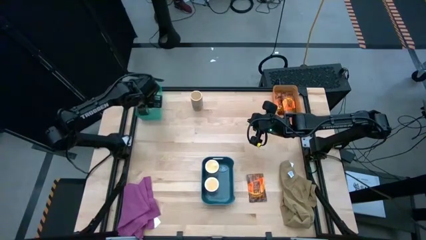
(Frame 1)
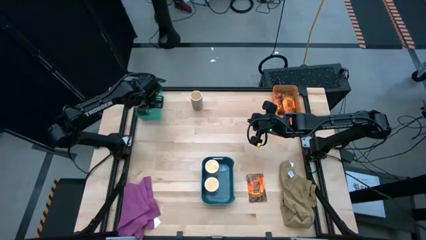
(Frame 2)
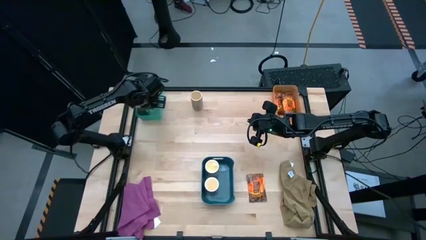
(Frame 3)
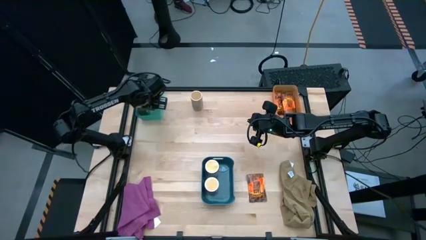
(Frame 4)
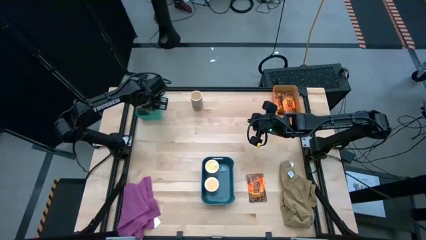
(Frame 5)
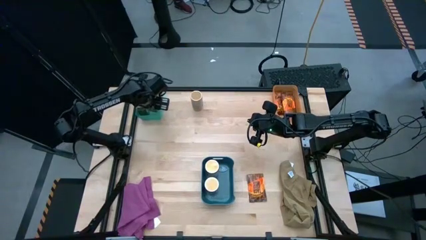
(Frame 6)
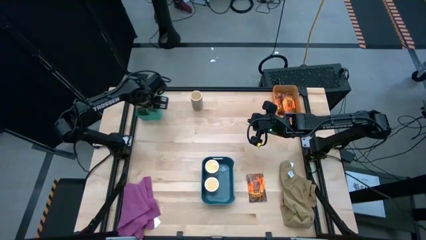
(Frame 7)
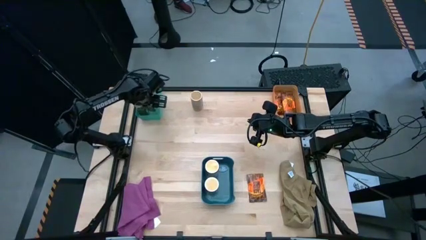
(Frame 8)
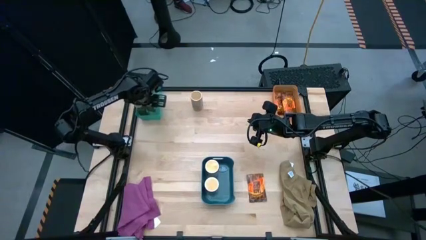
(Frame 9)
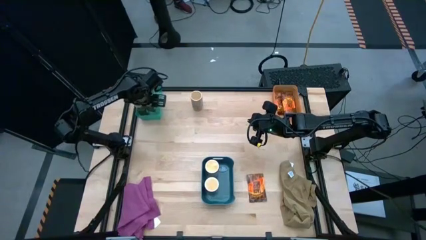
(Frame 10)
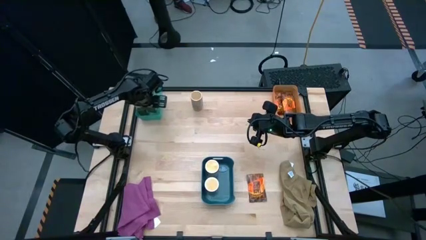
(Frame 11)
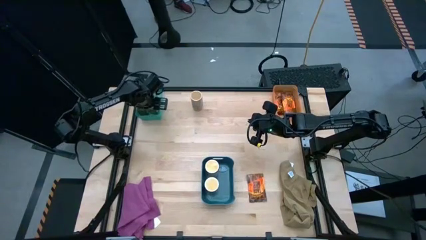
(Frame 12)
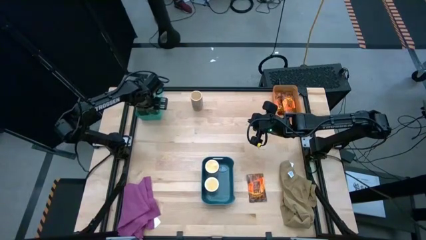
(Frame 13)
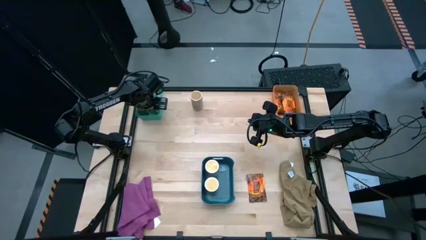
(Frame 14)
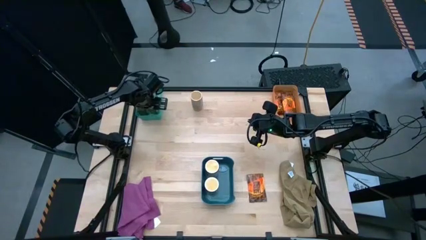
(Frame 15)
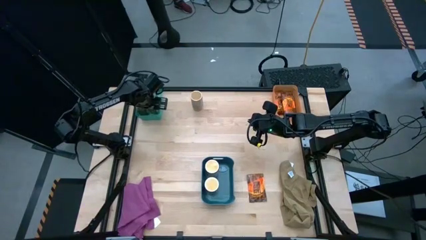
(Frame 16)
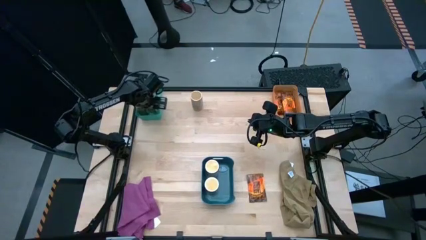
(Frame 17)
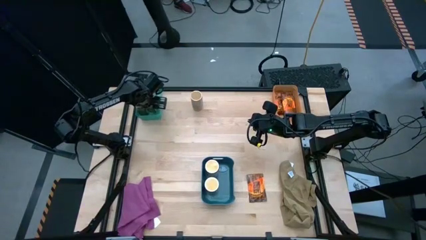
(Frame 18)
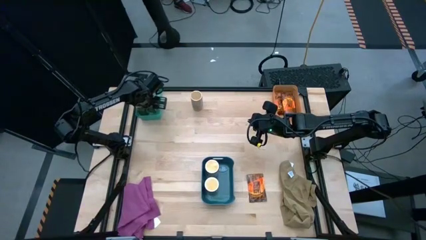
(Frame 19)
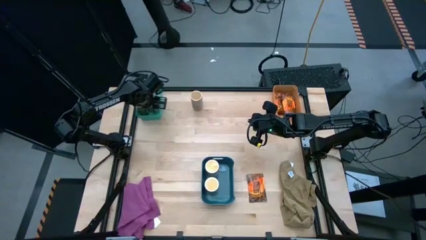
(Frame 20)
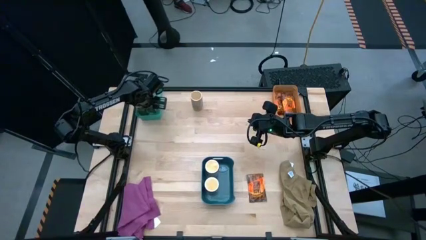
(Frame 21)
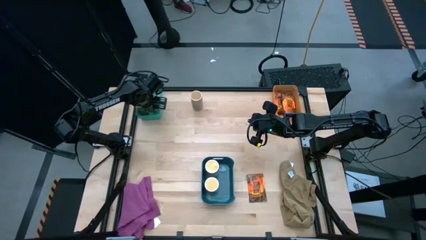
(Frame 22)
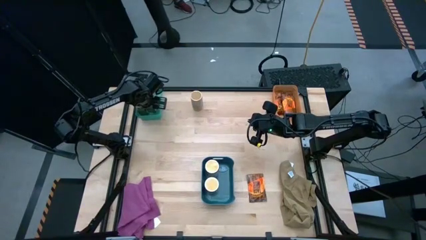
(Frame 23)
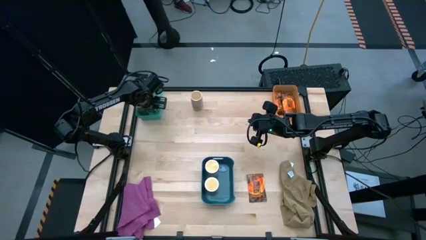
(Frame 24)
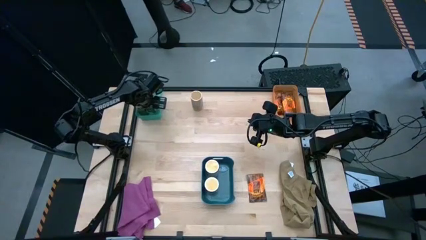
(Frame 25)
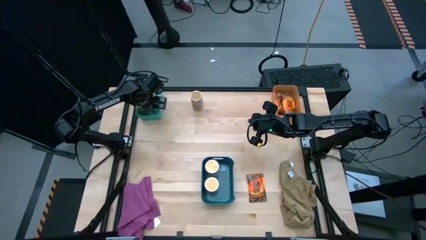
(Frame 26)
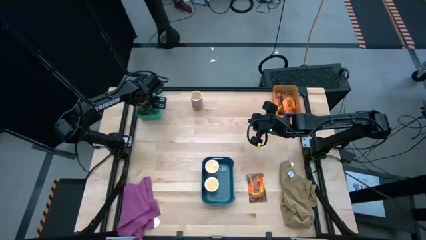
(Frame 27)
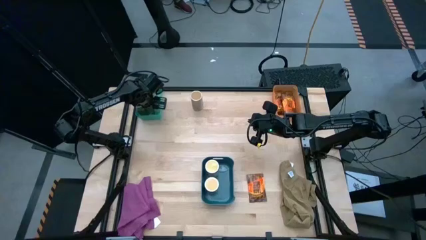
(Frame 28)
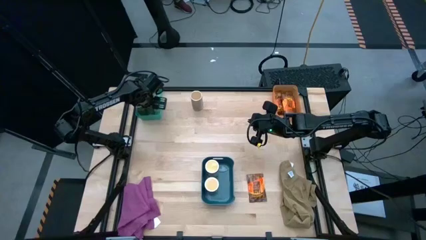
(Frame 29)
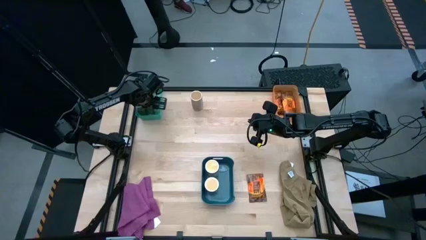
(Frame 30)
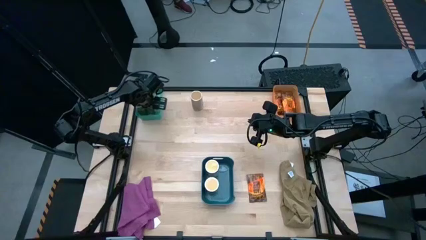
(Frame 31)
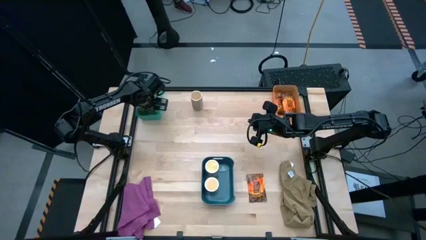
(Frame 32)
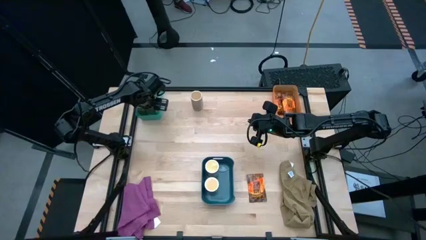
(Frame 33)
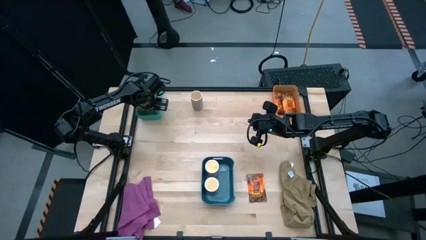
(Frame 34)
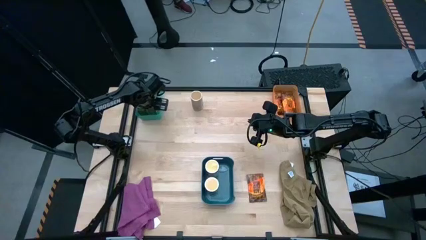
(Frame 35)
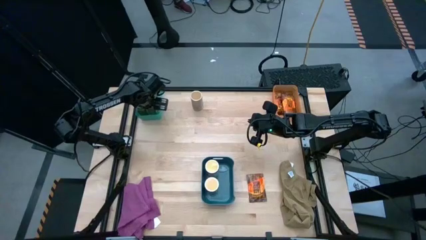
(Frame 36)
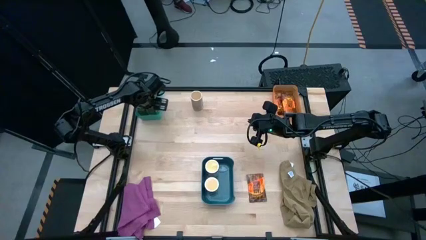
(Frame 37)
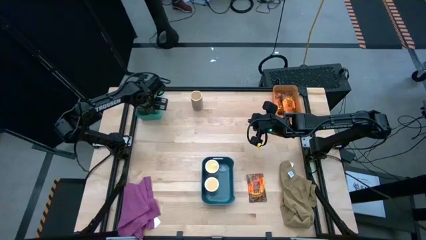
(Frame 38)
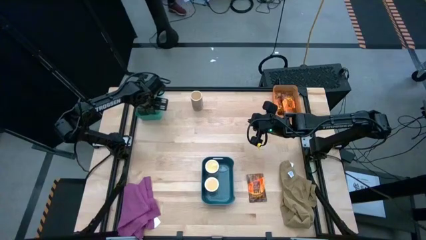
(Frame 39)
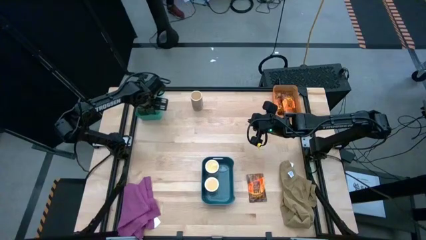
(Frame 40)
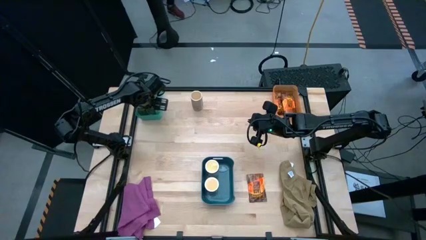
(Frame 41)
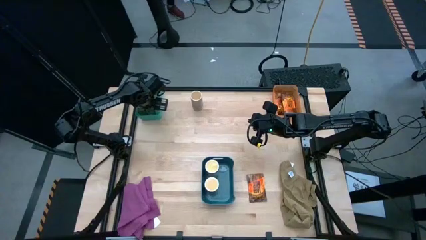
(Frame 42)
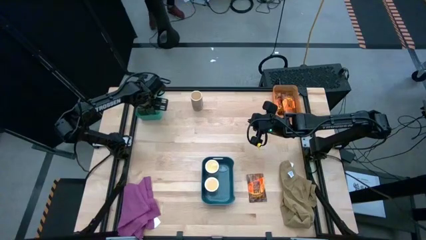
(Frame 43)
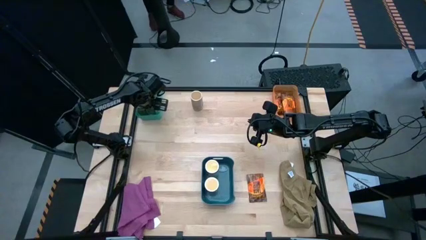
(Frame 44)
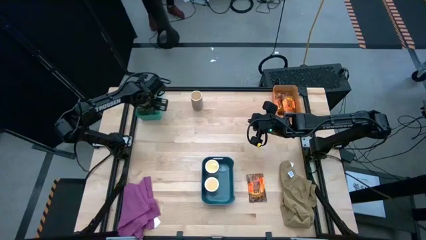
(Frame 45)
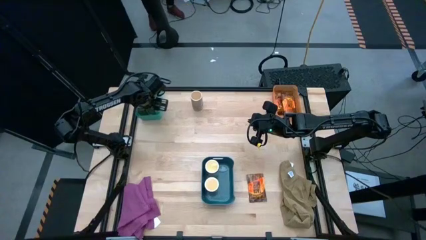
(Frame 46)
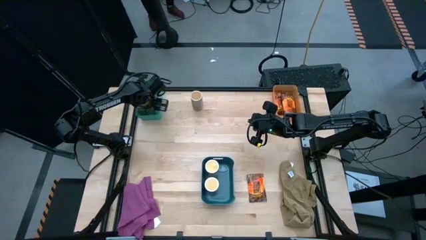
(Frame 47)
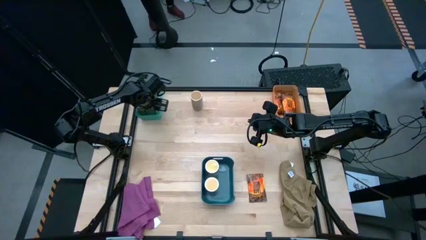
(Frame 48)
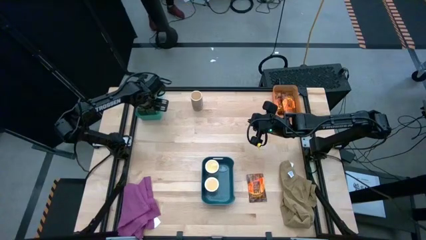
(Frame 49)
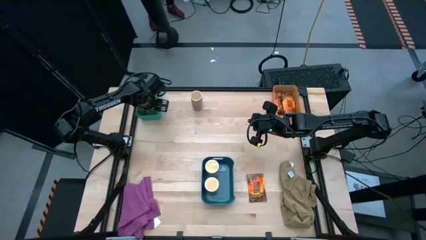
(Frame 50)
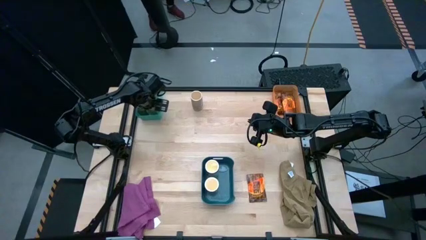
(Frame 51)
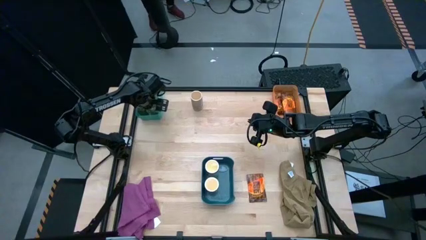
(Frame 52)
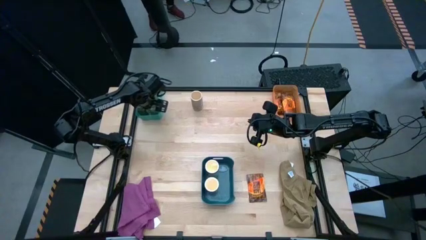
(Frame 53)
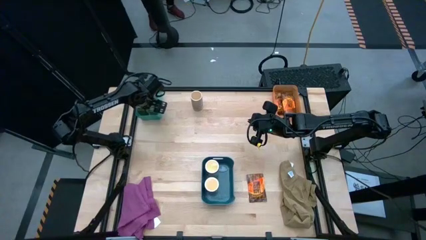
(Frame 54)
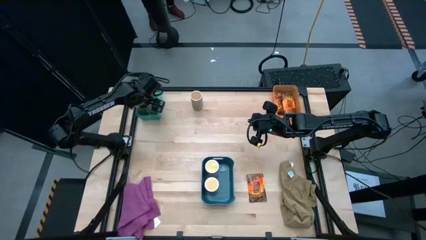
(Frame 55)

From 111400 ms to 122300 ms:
Task: Sort spices by type
Put the green seasoning bottle into the light blue bin

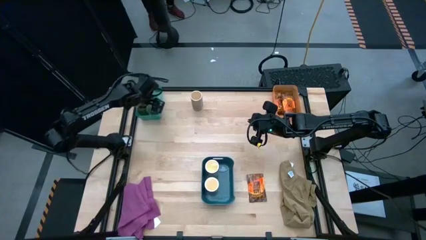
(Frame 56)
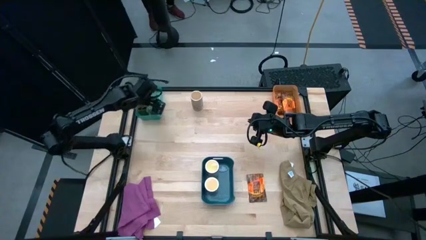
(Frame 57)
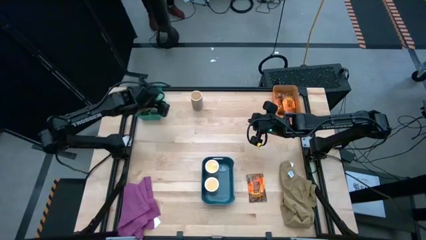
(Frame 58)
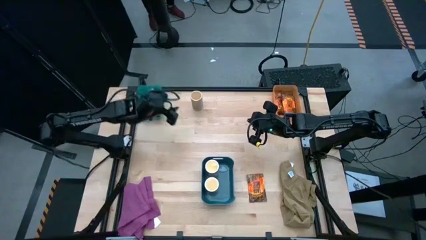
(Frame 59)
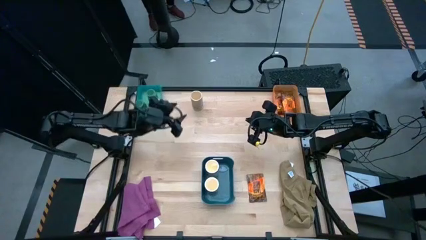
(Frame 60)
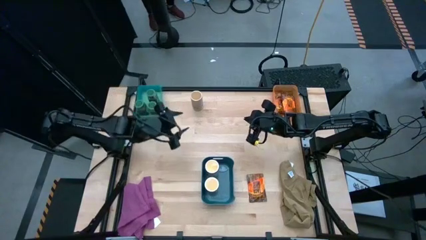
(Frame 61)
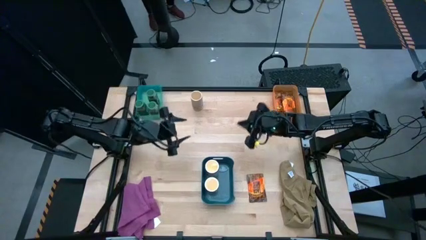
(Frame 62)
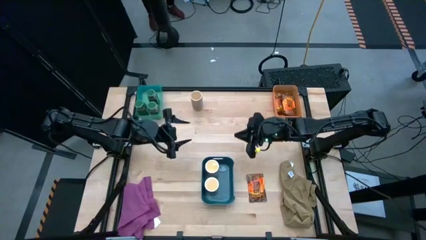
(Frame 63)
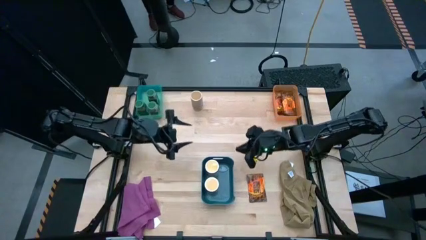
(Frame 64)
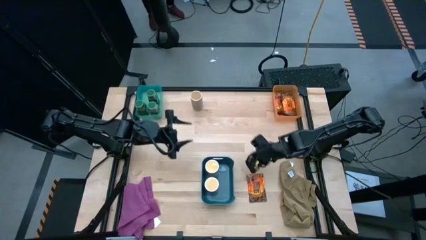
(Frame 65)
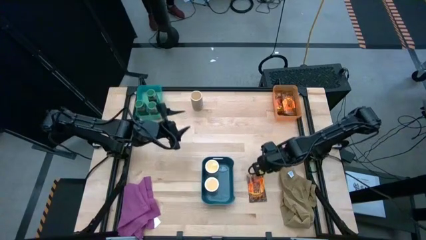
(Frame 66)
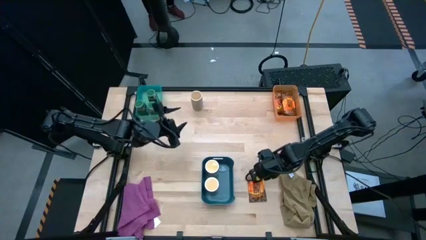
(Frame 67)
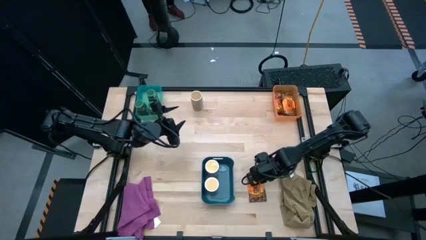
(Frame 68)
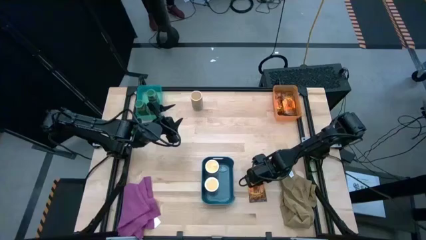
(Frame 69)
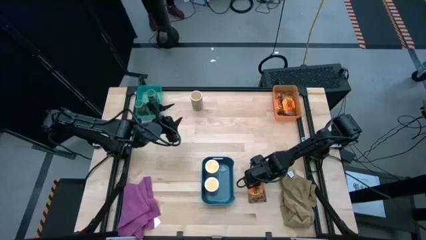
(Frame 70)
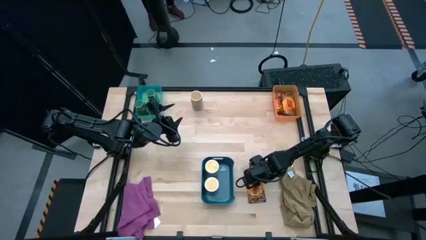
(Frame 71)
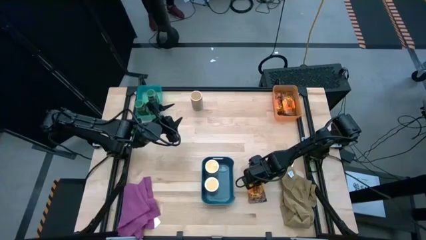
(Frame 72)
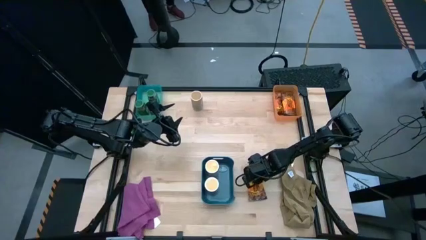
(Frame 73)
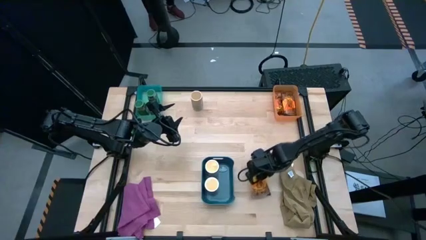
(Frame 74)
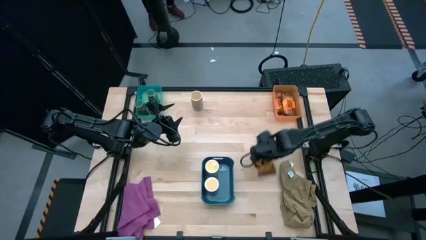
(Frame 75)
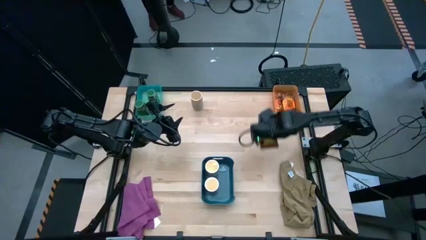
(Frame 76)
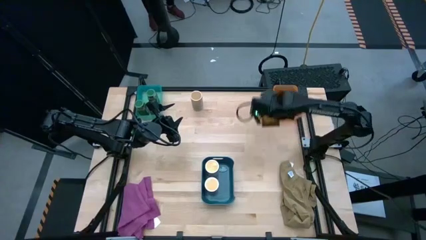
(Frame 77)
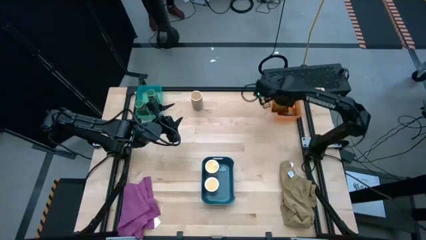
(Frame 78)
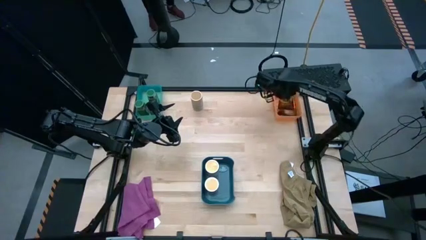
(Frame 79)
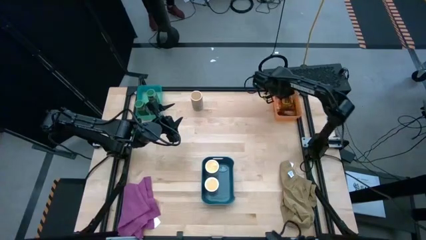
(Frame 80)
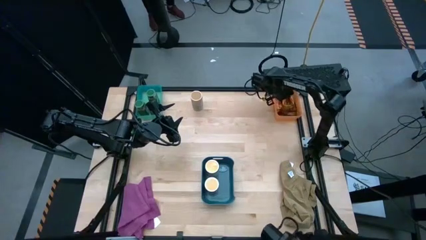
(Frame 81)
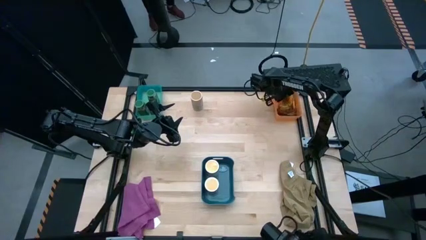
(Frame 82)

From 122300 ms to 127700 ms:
Put the orange seasoning bag into the orange bin
